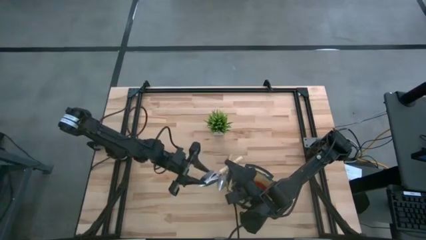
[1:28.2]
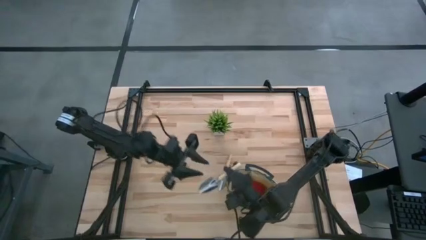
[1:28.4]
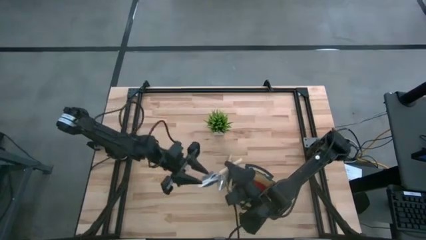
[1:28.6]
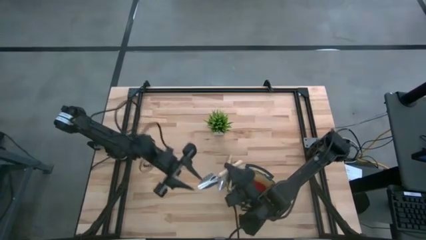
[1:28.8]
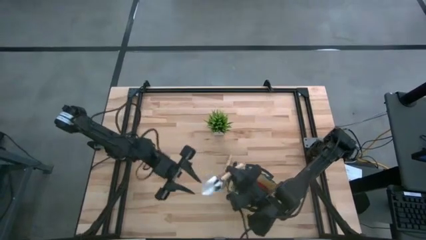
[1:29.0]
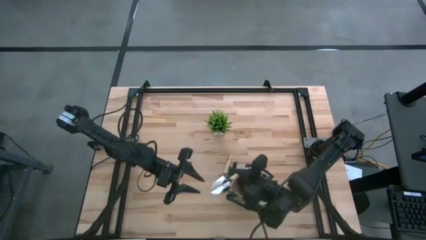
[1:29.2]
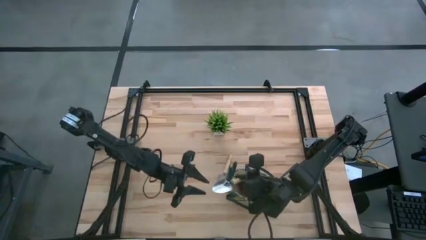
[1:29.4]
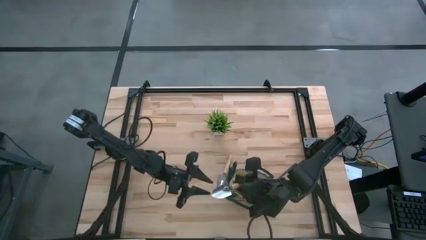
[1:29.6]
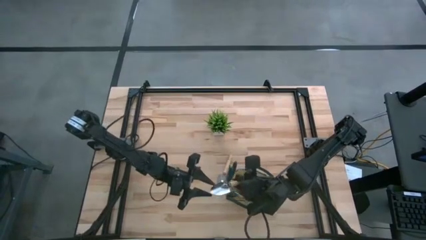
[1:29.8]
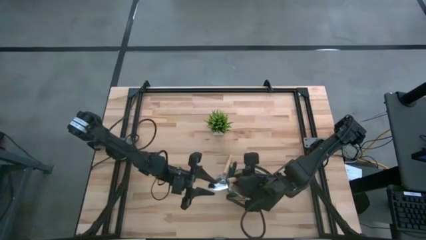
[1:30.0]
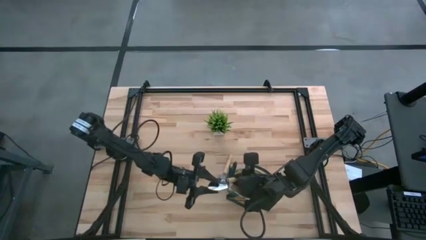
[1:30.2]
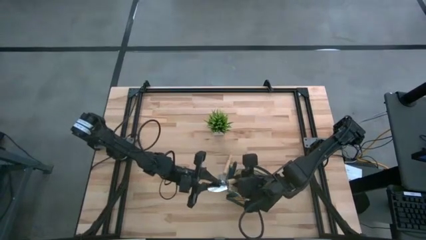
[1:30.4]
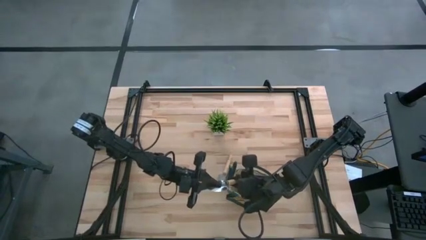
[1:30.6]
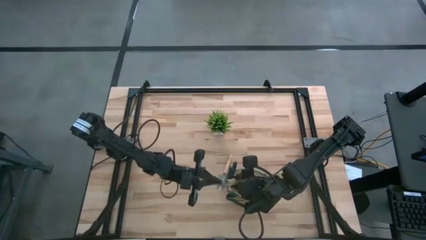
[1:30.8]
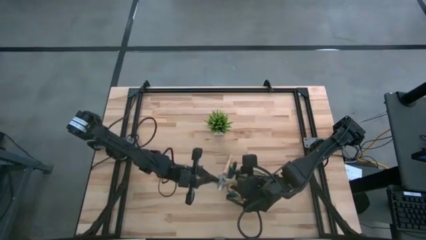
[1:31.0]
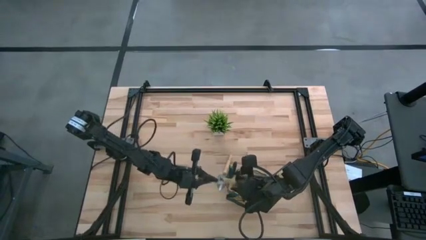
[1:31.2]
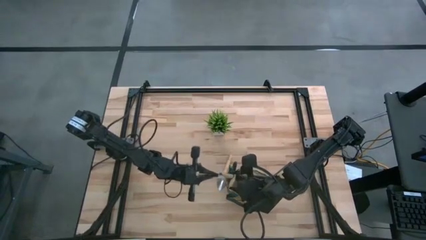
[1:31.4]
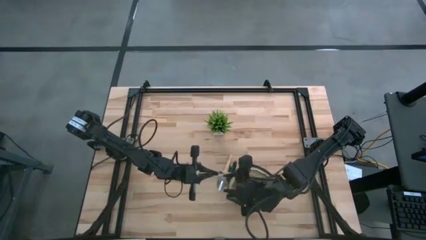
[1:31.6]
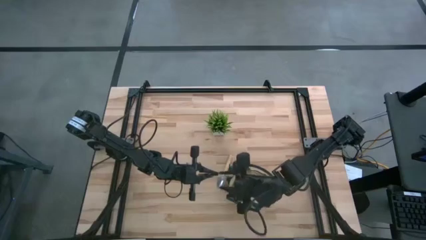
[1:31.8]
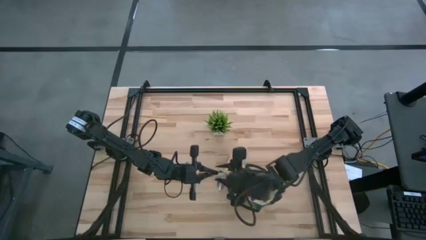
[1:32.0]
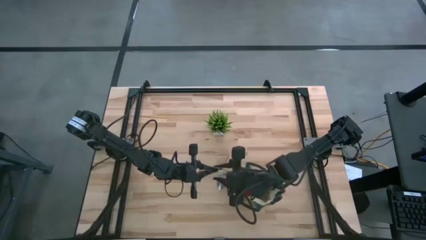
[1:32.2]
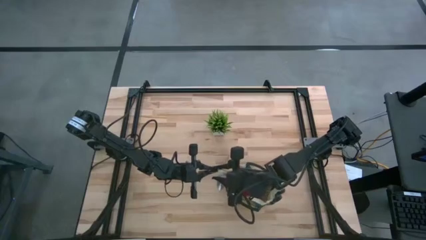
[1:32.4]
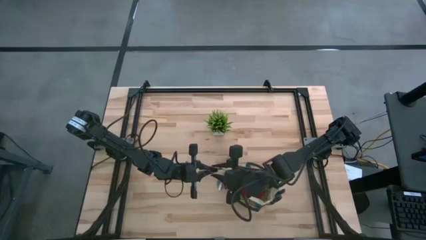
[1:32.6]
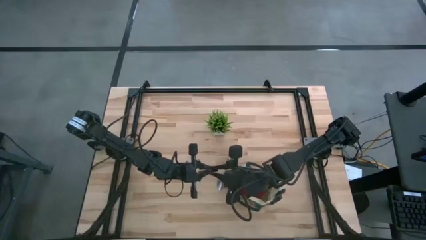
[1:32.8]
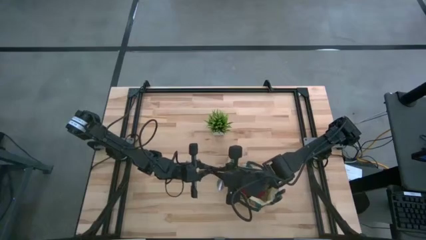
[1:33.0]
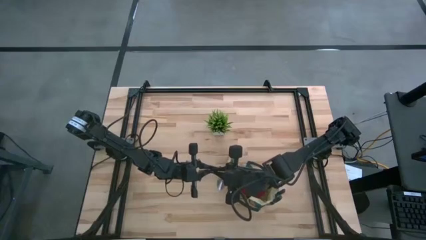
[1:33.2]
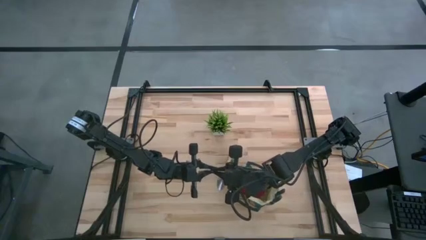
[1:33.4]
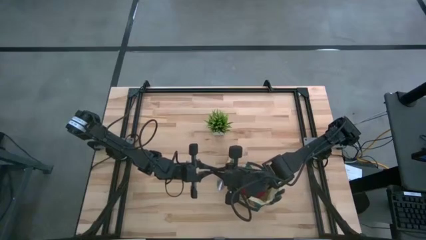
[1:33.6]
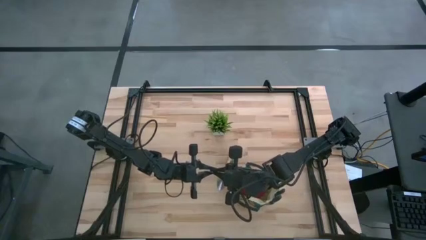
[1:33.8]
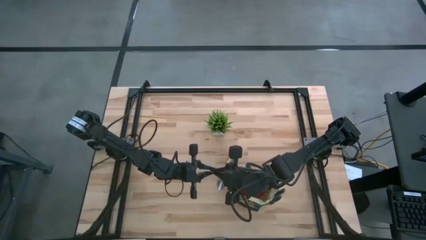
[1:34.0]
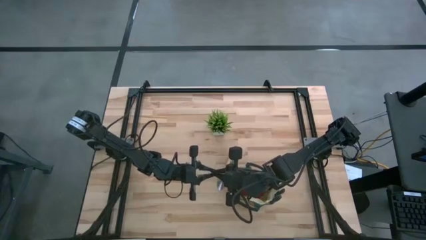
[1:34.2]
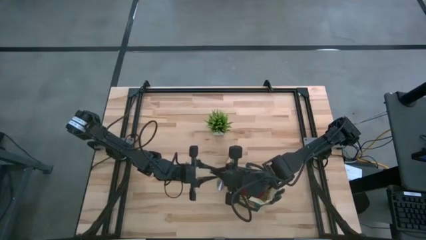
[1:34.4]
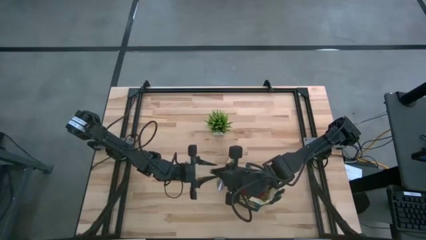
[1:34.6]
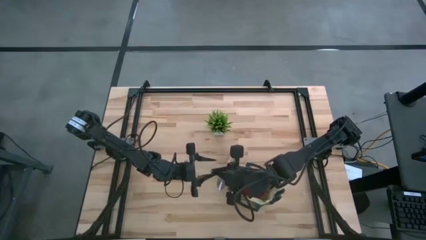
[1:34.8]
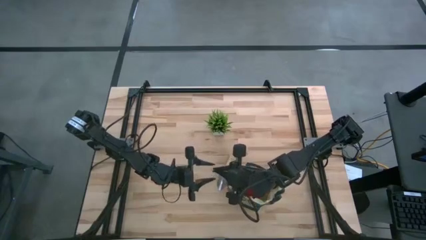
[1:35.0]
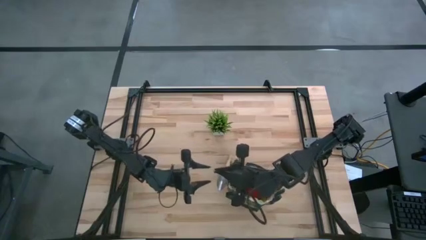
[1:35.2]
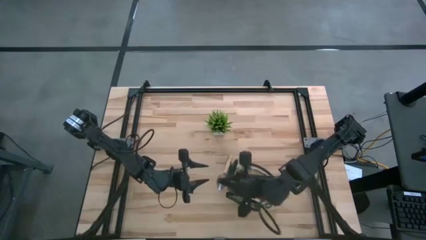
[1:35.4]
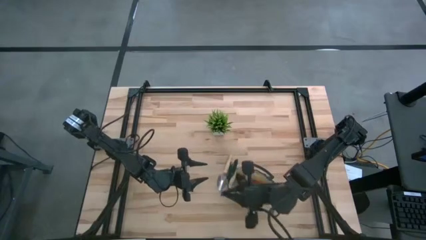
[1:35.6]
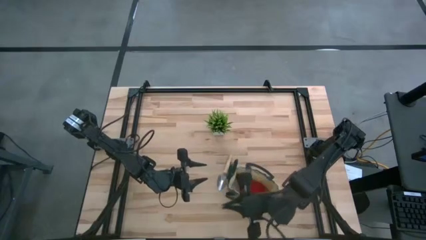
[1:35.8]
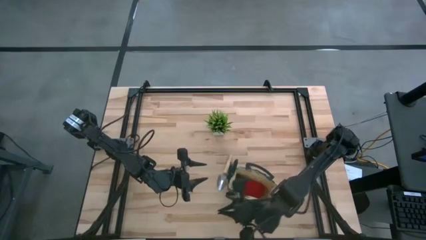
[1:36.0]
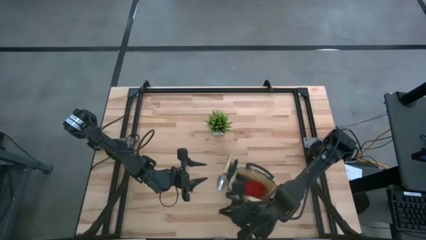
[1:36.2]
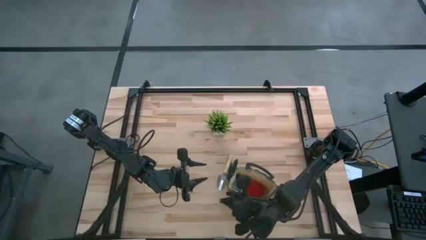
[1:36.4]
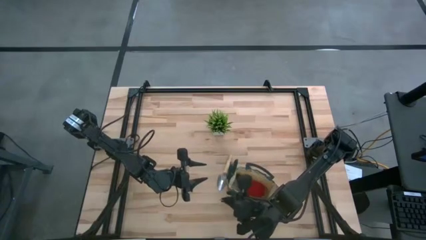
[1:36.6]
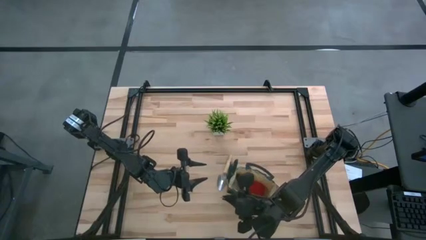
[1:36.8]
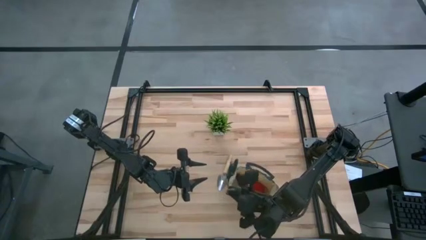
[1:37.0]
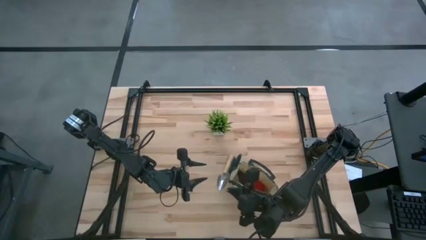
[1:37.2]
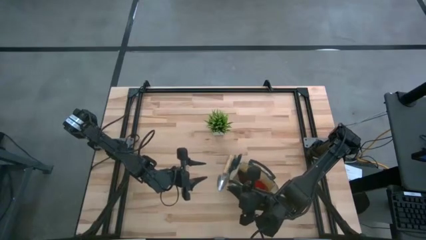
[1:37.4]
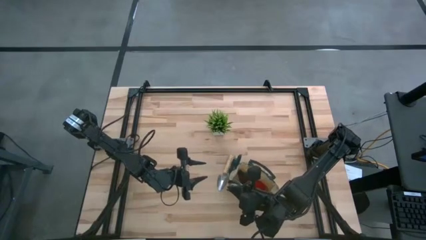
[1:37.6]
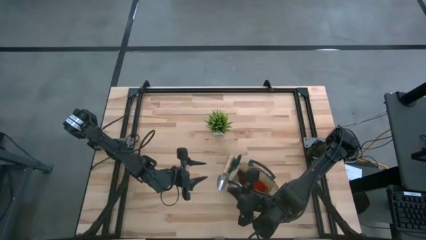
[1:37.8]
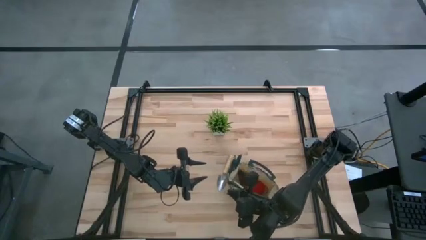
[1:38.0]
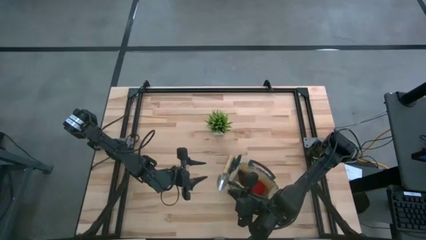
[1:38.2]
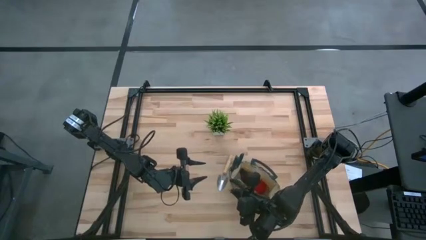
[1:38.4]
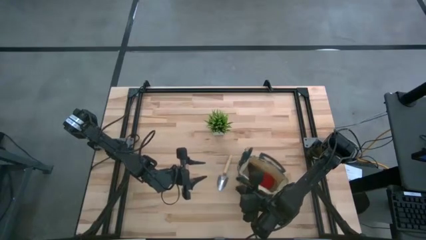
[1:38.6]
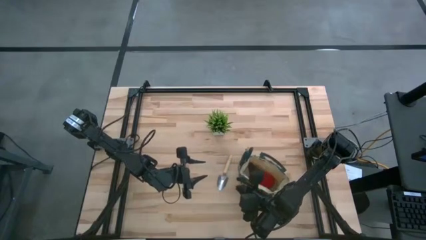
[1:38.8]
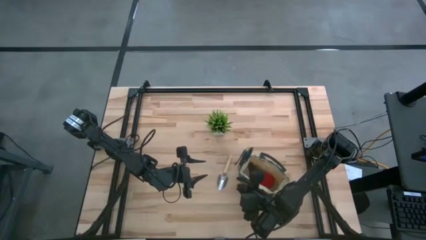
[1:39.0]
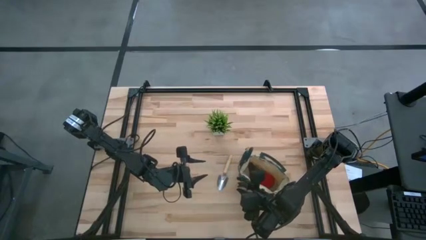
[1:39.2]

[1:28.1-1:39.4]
Task: Pick & Place Garden tools in Gardening bag
Put the brown trowel into the green gardening bag

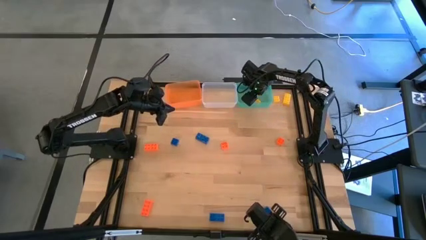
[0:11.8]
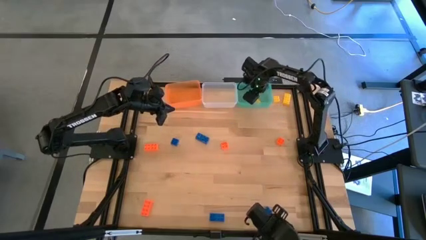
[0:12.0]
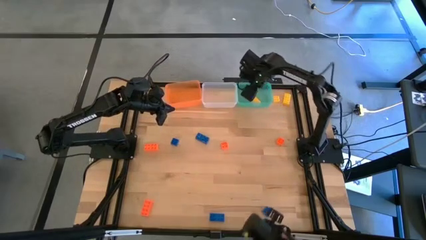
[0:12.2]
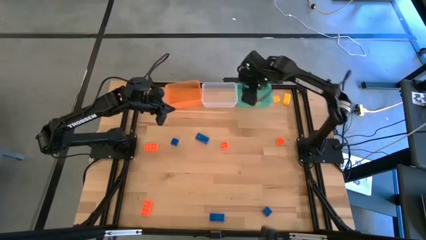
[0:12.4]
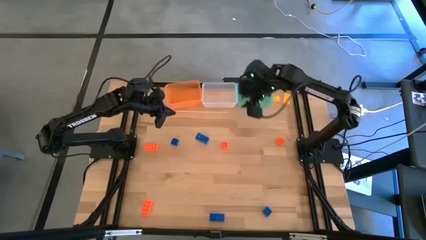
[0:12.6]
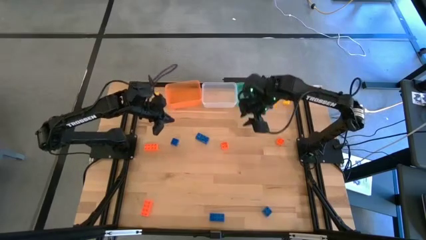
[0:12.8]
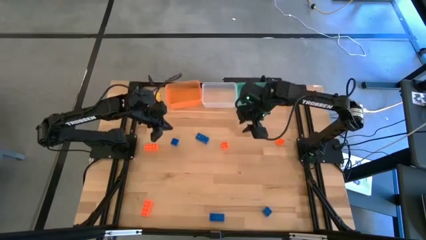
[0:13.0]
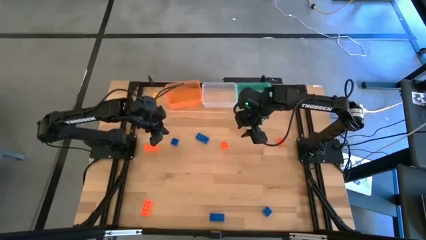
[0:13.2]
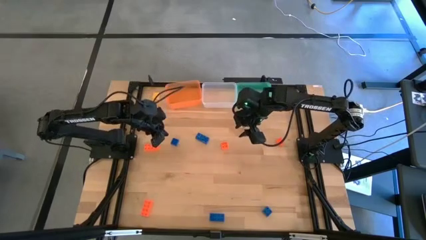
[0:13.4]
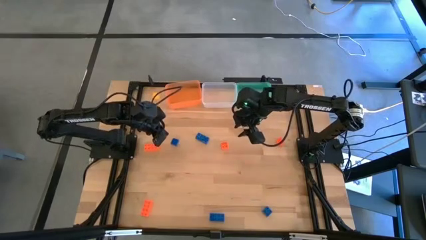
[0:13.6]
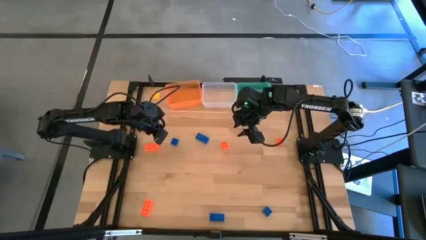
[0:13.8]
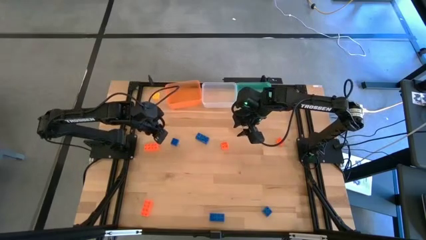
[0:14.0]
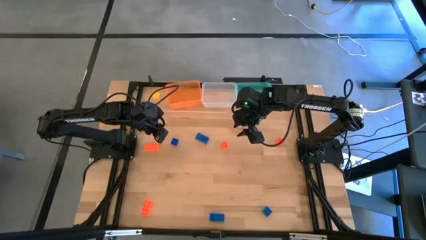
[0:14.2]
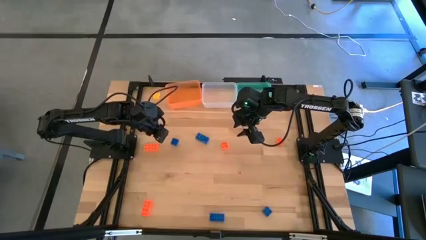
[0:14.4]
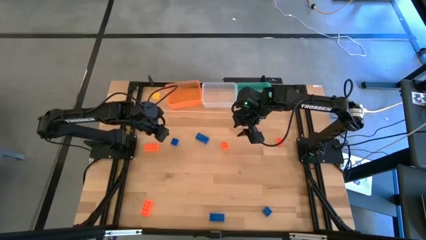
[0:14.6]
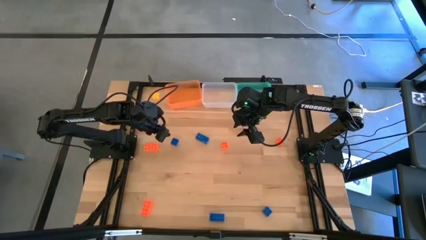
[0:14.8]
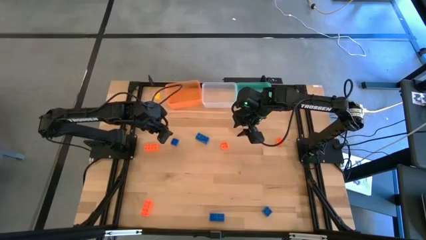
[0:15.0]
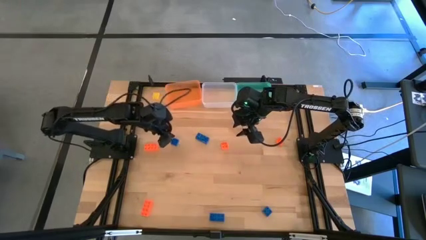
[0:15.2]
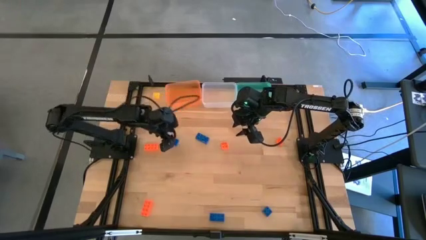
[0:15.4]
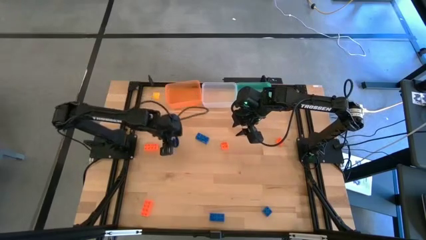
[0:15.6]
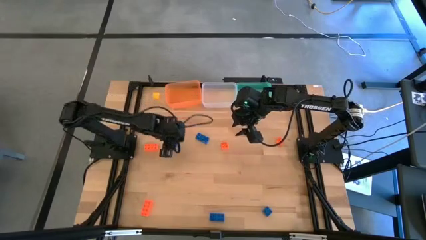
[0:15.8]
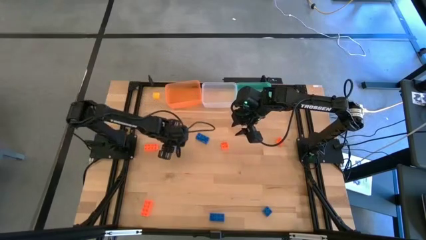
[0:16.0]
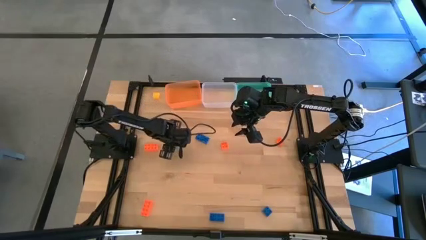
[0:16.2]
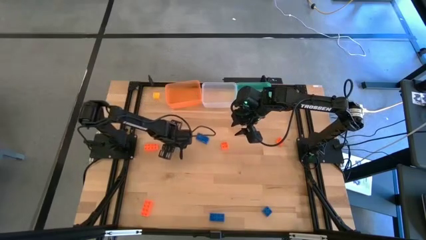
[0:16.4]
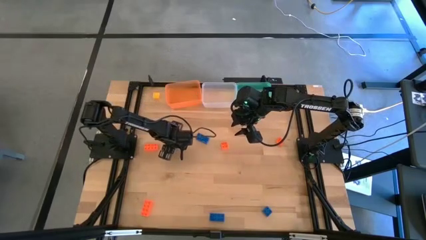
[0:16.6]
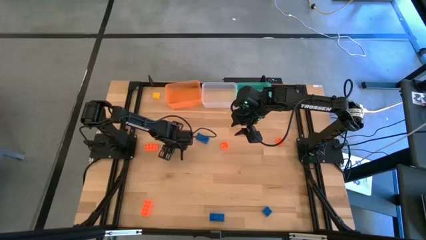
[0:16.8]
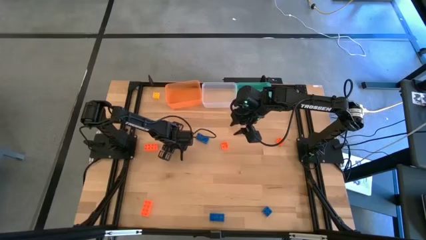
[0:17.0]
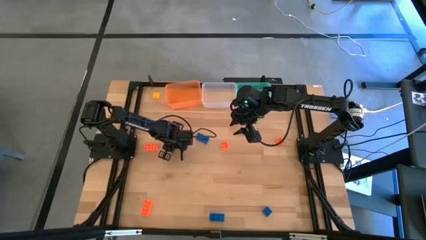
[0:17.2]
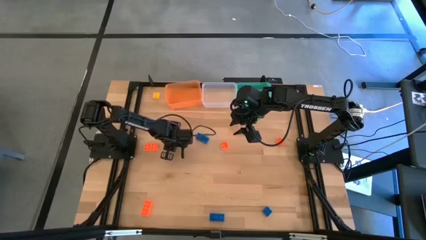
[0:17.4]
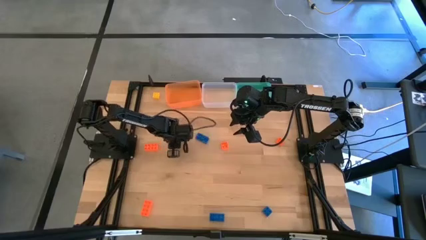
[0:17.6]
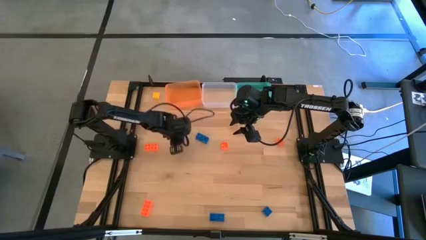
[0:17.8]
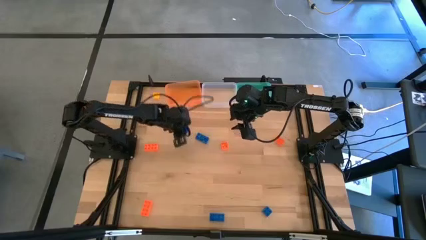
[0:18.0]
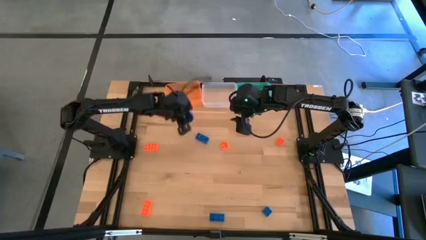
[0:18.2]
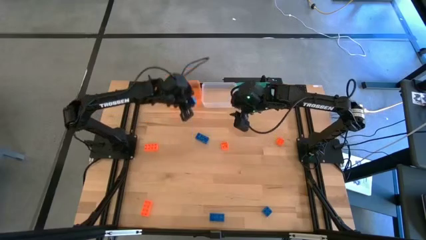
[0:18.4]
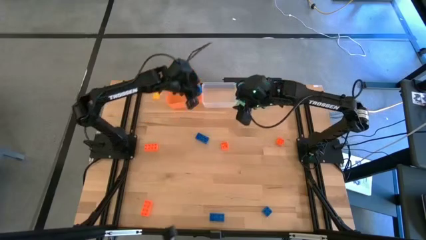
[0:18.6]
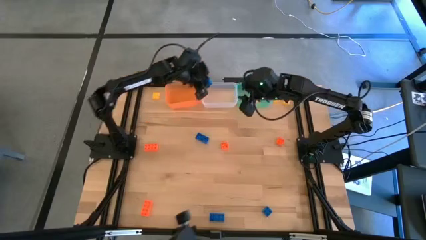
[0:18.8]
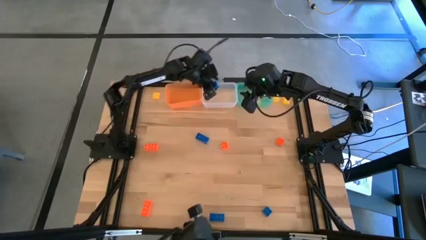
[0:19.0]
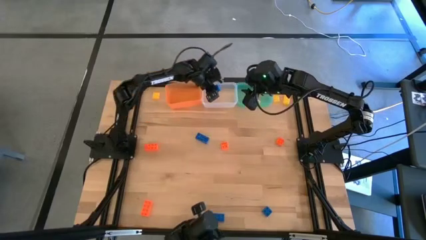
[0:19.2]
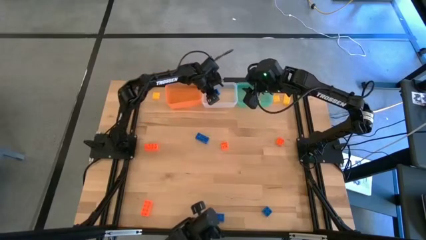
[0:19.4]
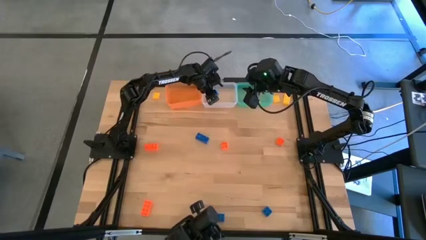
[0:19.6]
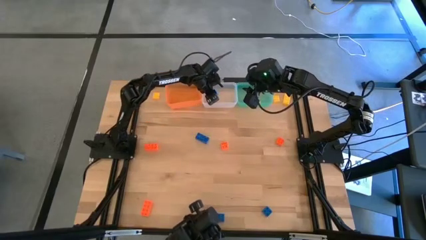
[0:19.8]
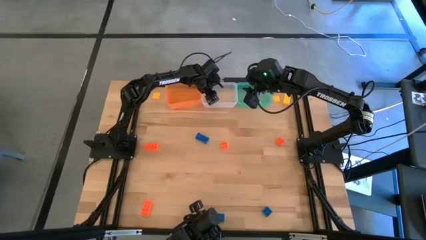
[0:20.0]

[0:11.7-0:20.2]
Task: Sort & place blocks by color
Put the blue game piece into the transparent bin
